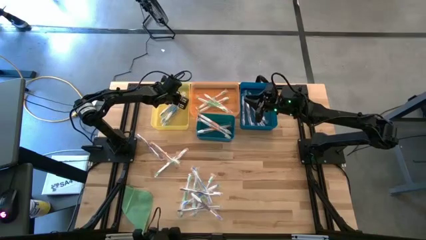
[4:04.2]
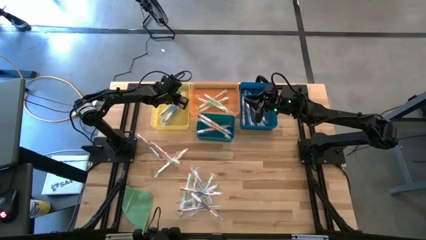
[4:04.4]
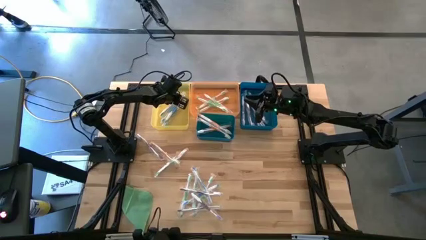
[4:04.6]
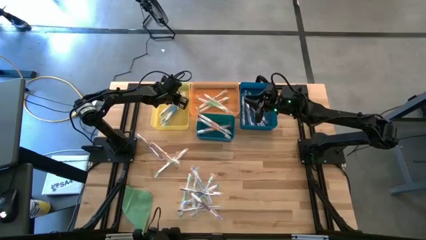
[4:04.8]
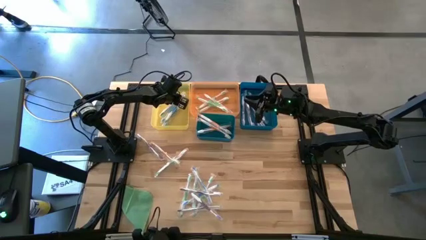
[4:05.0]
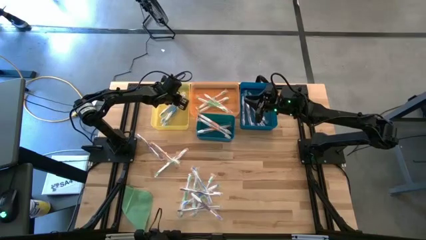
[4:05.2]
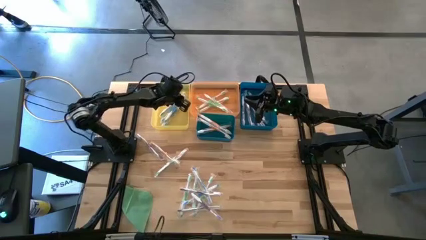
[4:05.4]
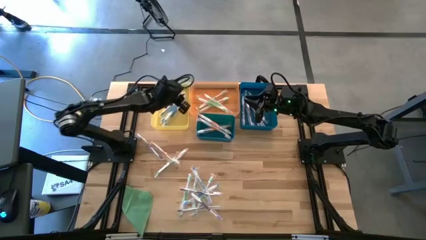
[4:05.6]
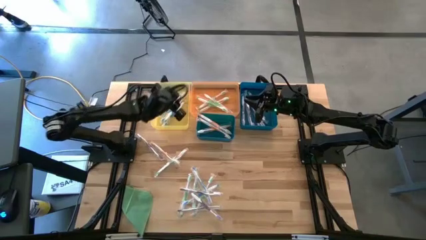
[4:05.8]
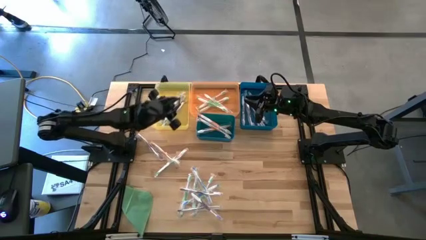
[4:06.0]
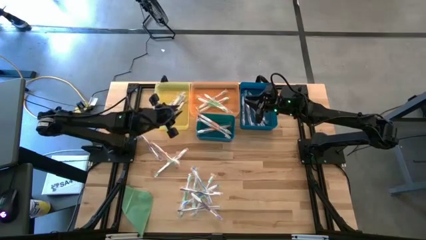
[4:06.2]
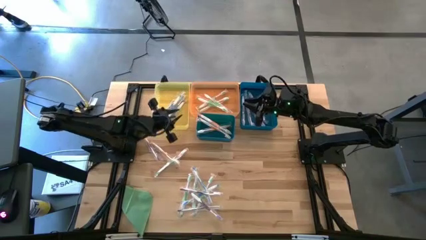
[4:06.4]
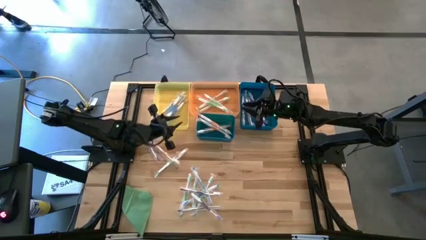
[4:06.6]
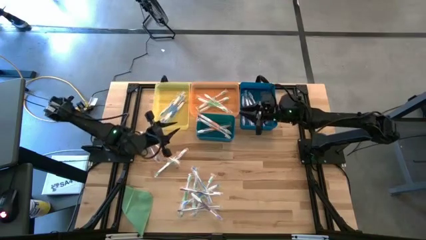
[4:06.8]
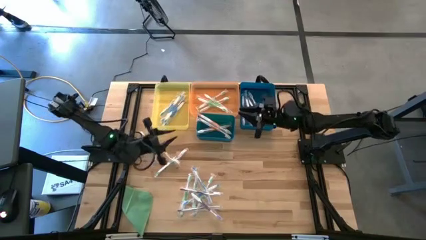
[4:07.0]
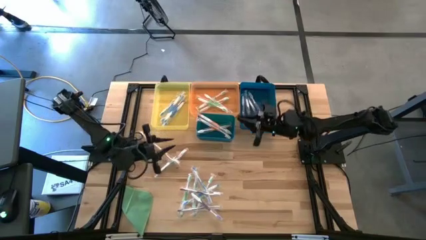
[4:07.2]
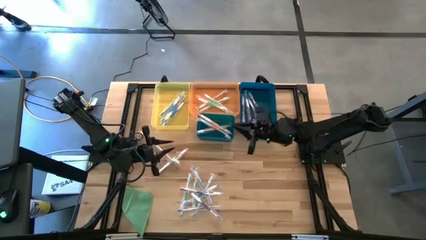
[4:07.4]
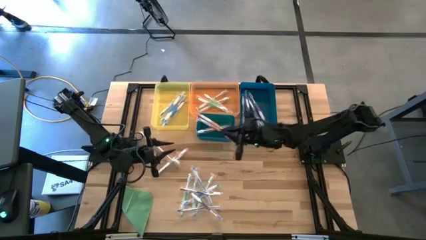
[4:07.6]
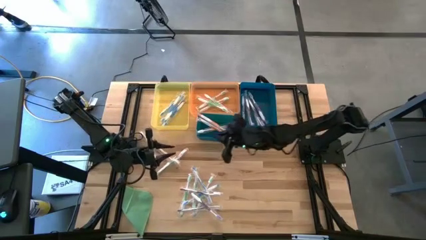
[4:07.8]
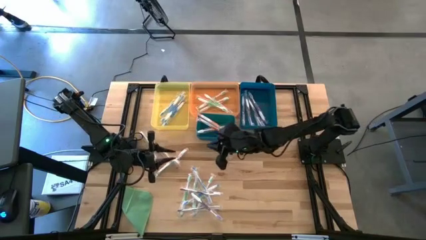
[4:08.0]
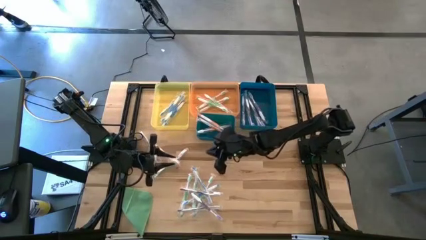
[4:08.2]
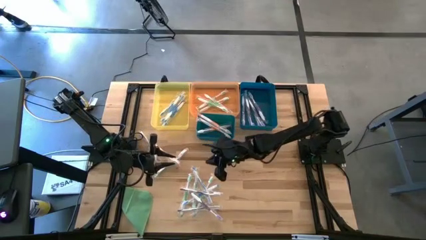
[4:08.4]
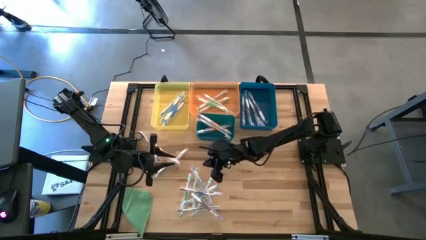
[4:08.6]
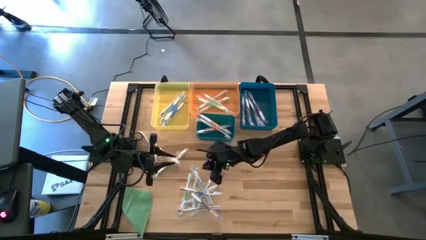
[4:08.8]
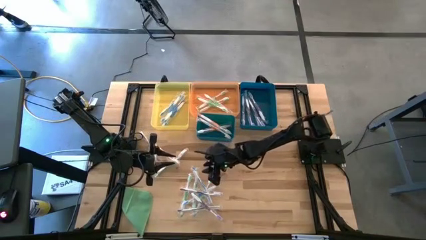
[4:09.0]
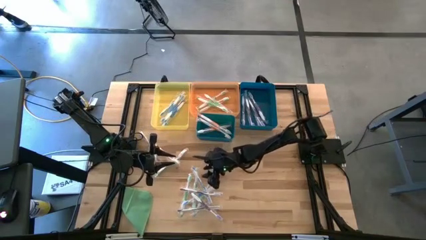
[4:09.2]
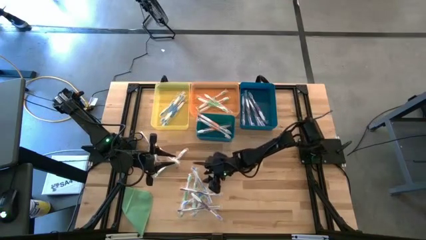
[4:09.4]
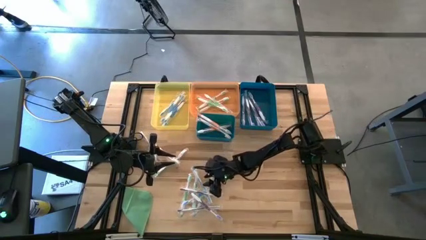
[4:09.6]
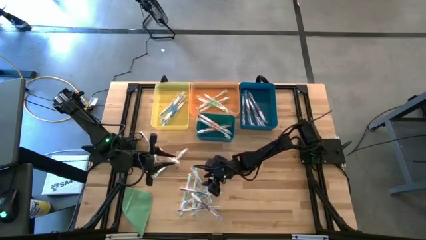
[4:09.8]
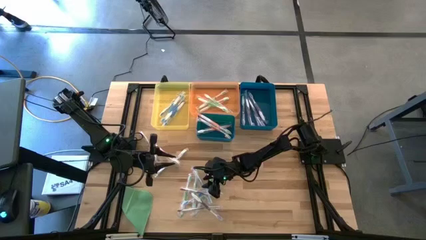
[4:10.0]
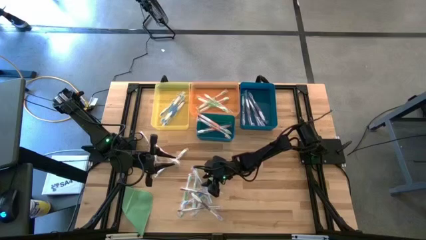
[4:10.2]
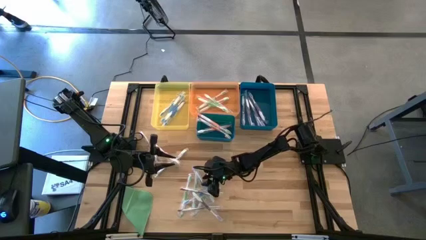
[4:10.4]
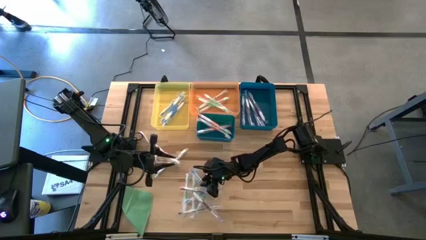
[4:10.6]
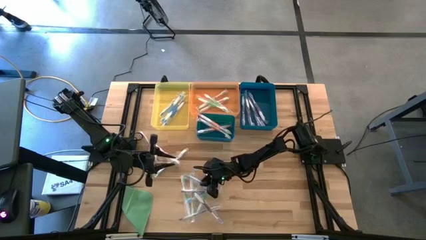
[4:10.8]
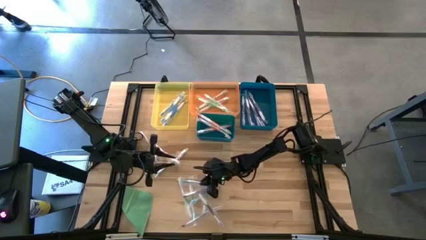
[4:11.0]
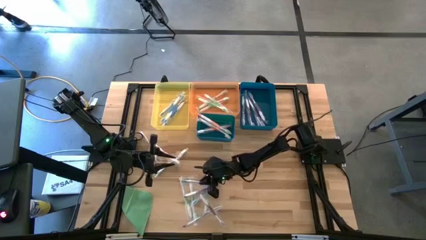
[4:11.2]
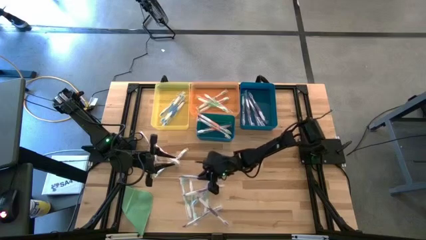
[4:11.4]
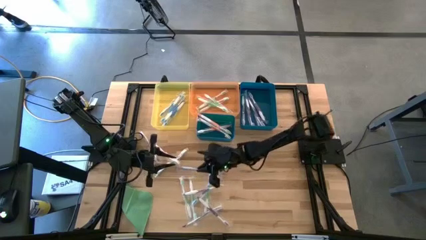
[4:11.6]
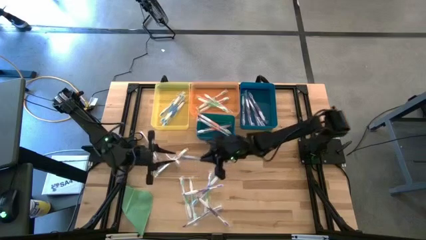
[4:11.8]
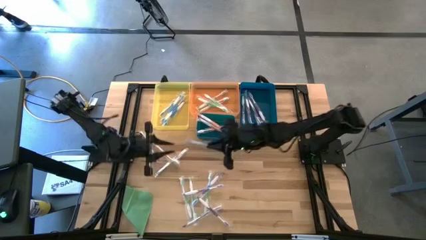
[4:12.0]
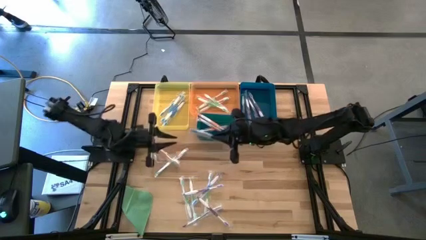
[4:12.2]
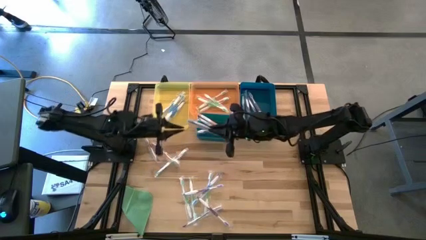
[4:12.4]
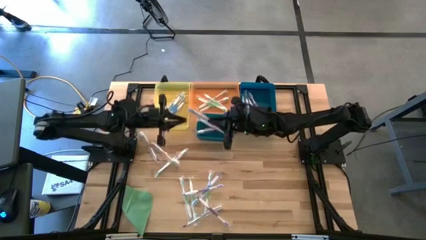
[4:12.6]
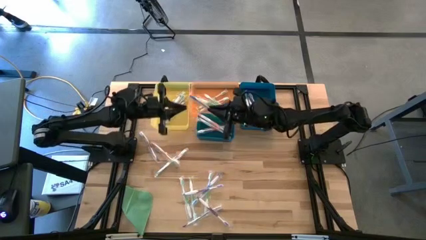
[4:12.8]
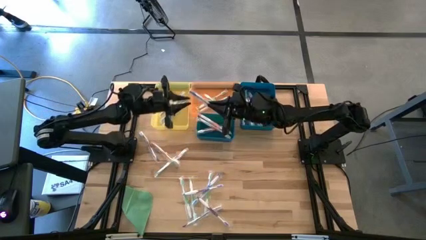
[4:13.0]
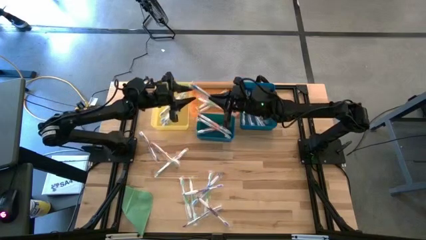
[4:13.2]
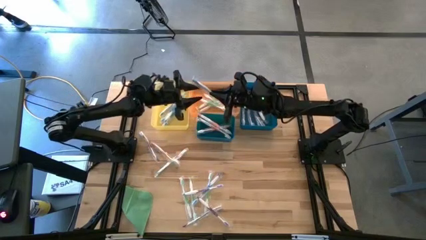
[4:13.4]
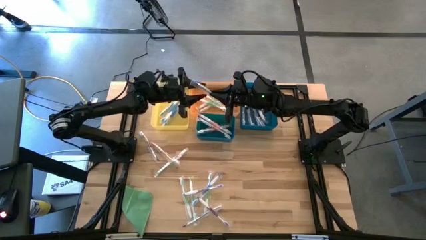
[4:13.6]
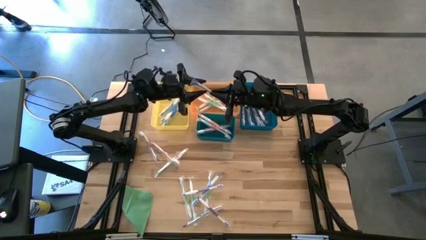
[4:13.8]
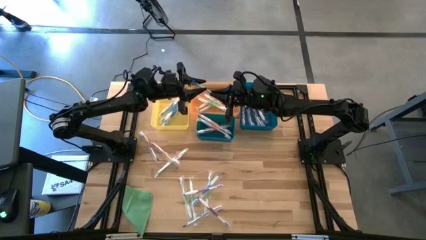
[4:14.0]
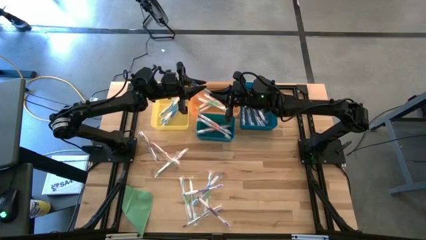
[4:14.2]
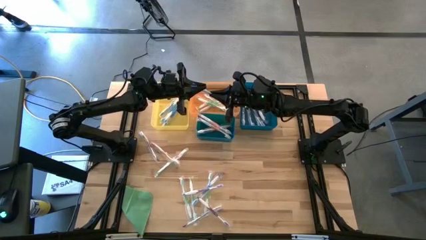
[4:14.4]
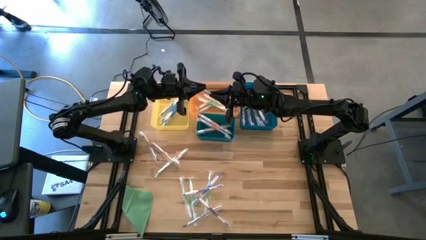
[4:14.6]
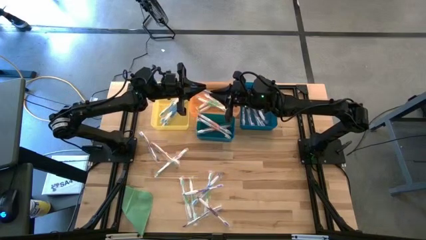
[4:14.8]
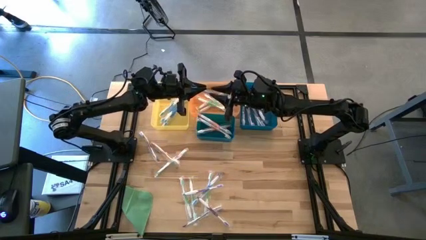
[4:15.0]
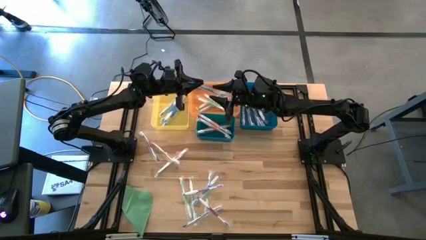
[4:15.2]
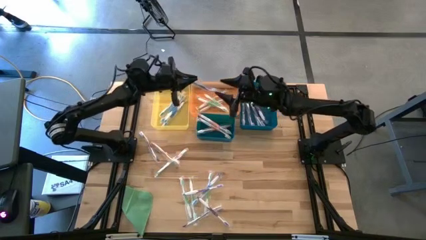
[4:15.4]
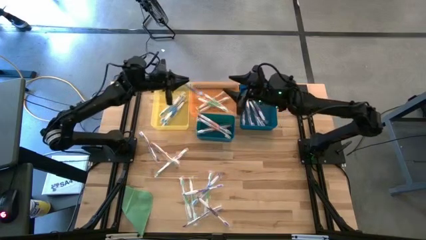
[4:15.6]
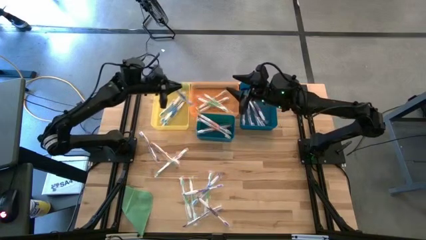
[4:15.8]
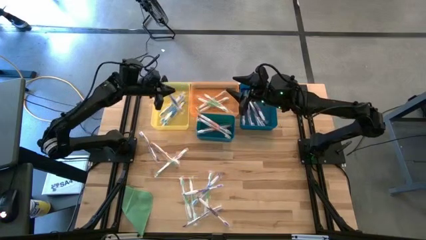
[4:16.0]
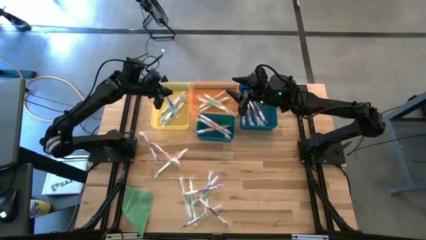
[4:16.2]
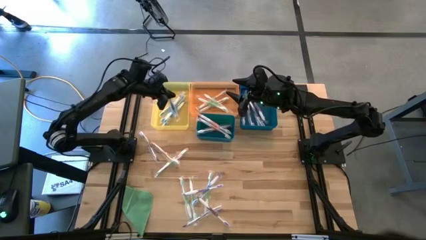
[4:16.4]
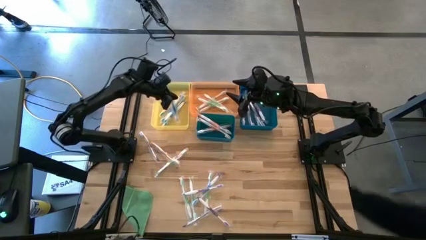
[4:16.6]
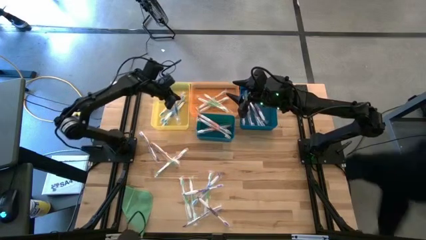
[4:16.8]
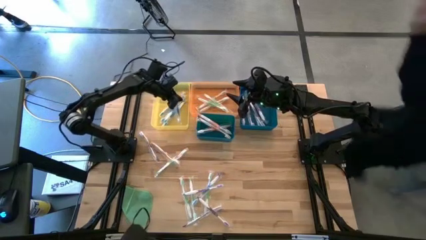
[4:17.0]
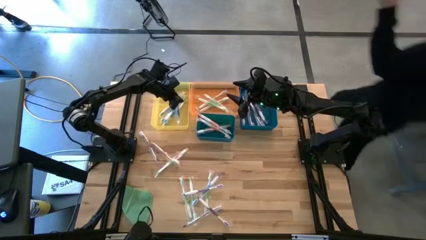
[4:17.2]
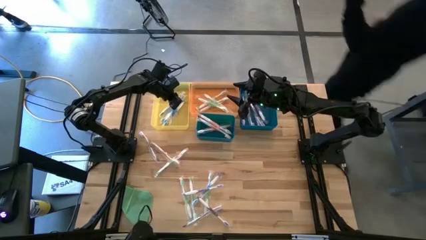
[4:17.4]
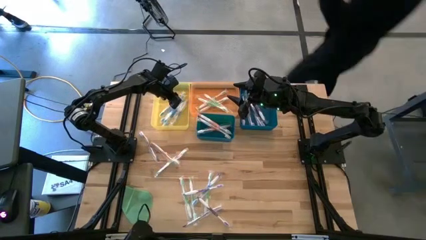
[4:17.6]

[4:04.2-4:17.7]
Task: Pick & Place Toothbrushes
Put the blue toothbrush into the yellow bin
